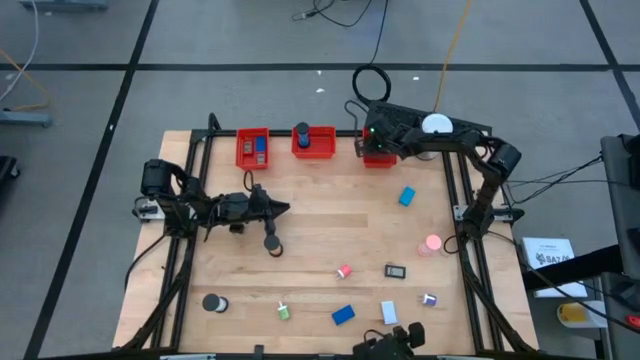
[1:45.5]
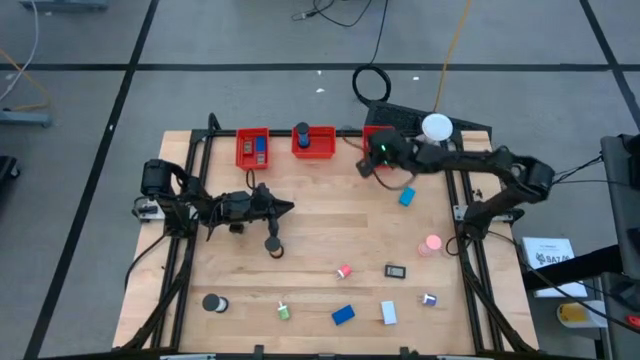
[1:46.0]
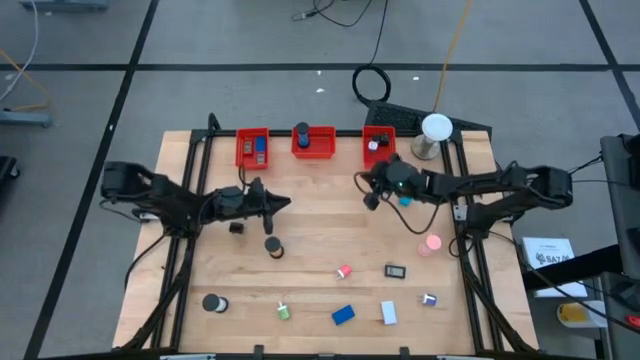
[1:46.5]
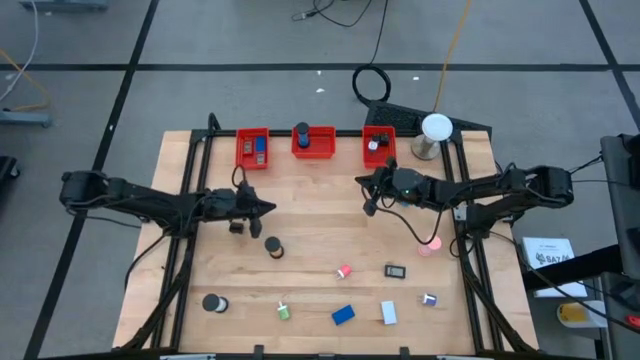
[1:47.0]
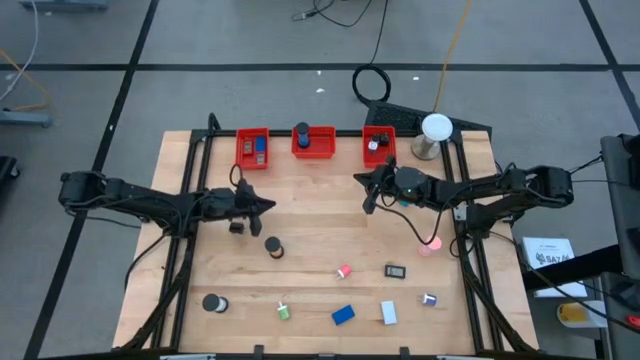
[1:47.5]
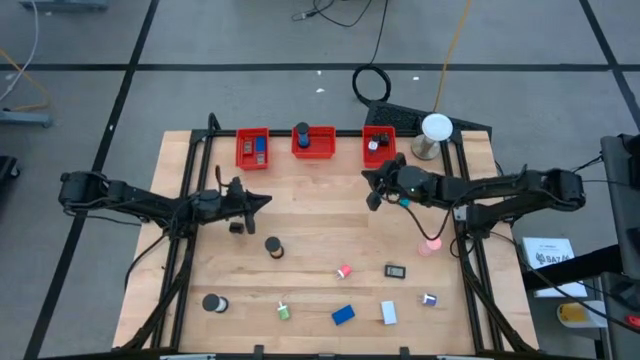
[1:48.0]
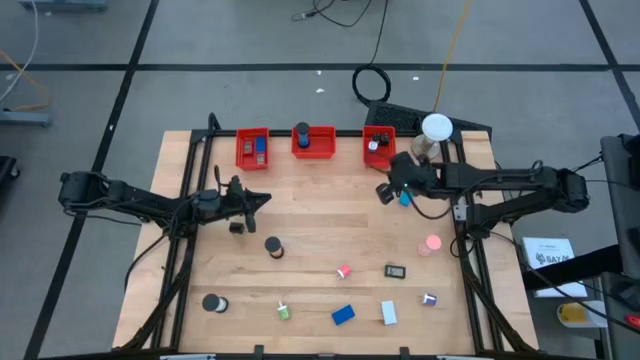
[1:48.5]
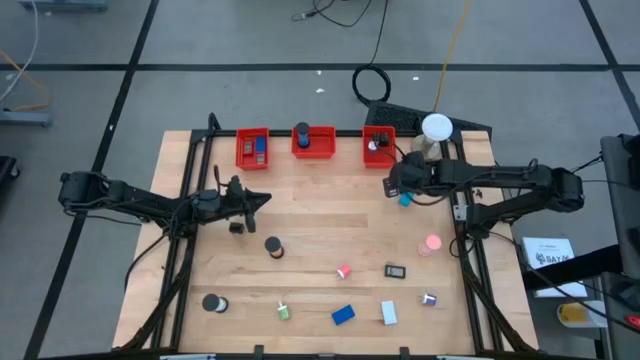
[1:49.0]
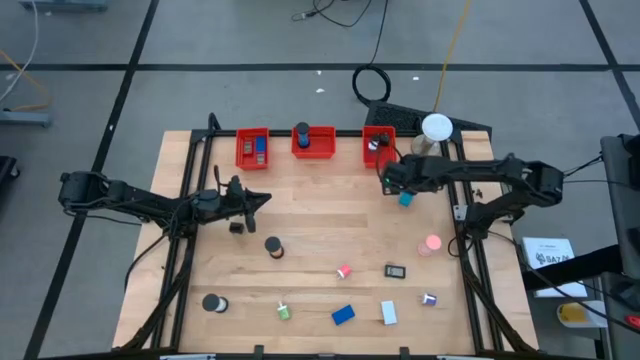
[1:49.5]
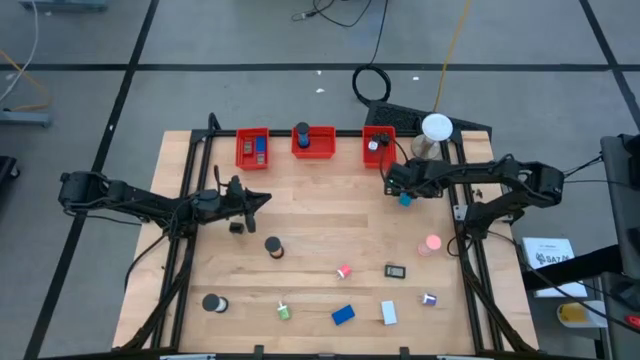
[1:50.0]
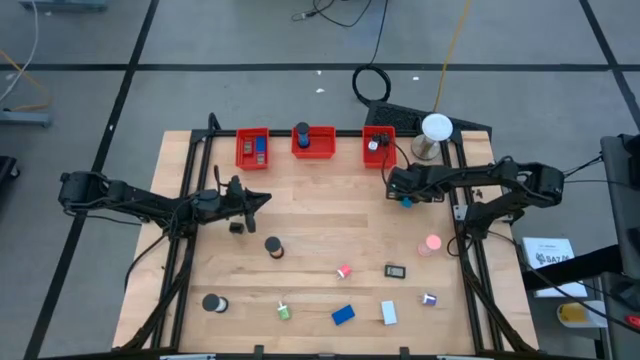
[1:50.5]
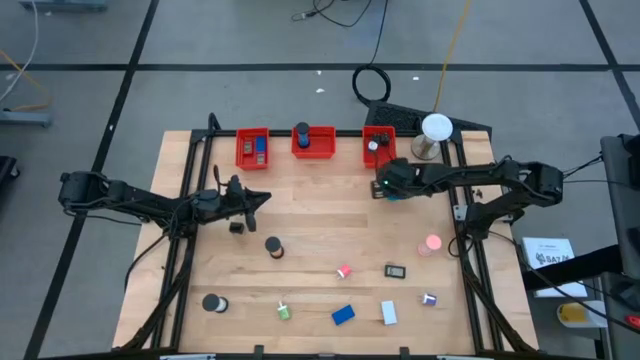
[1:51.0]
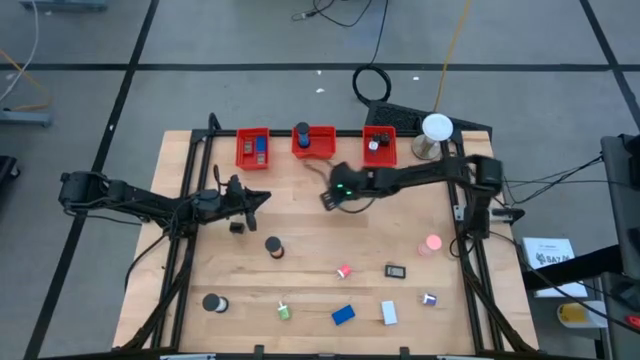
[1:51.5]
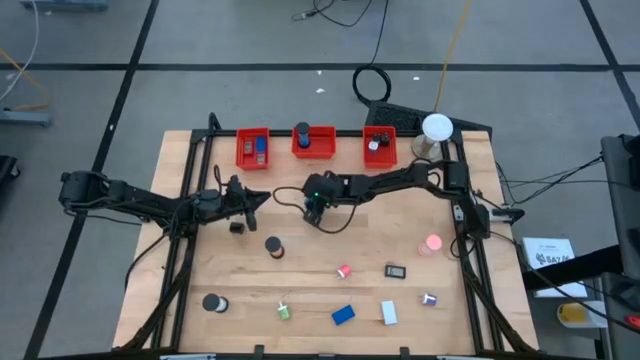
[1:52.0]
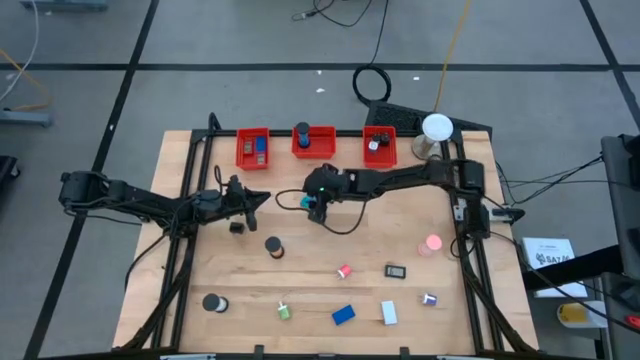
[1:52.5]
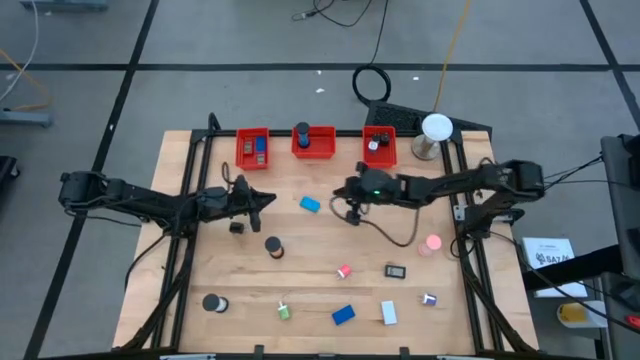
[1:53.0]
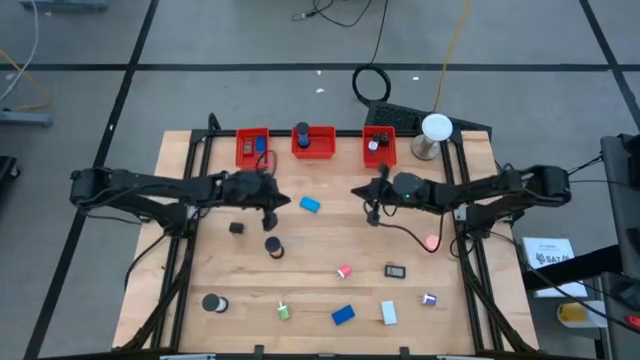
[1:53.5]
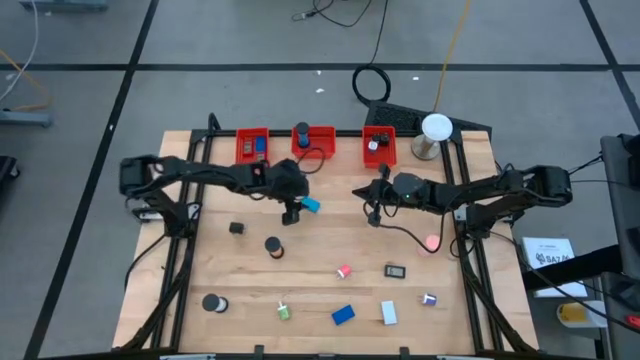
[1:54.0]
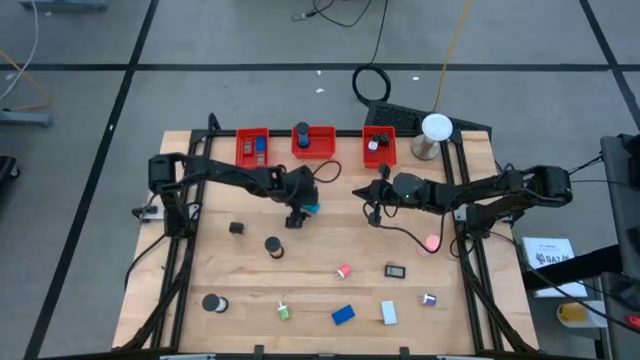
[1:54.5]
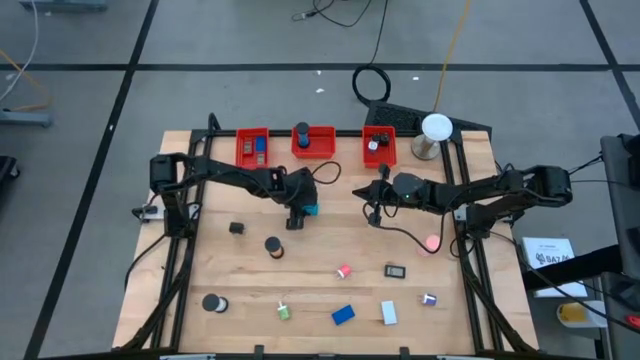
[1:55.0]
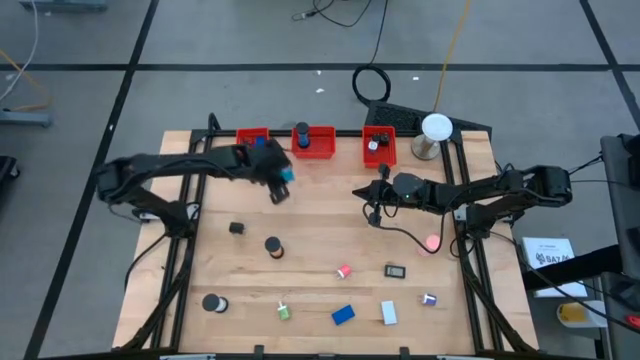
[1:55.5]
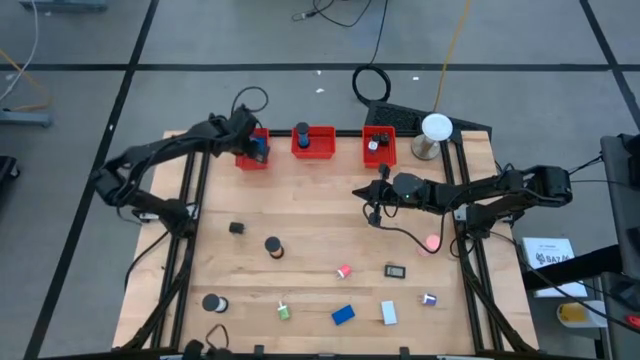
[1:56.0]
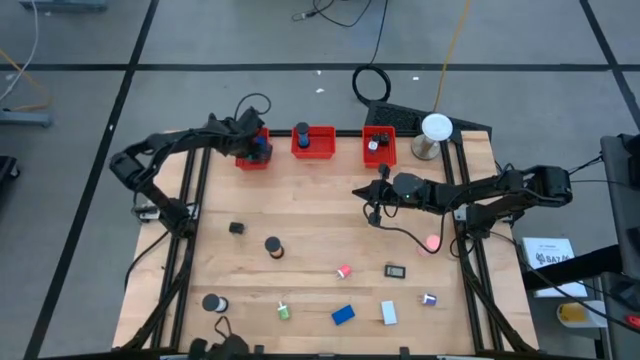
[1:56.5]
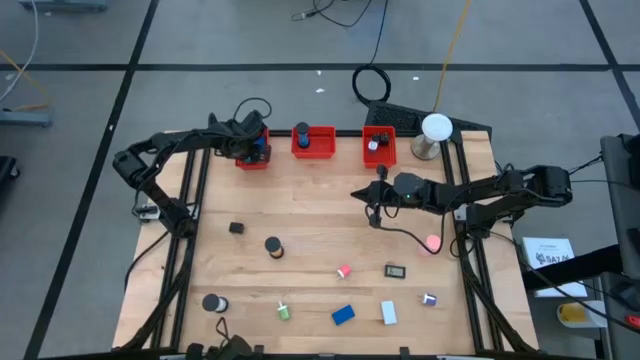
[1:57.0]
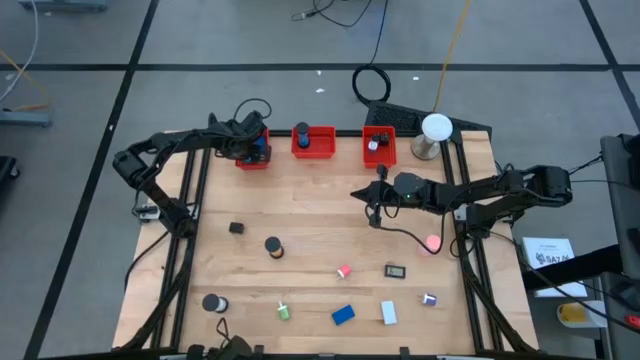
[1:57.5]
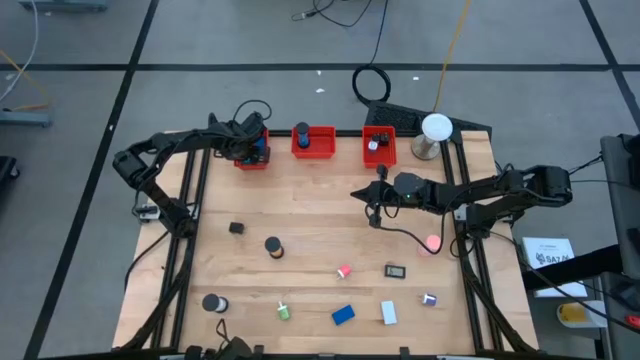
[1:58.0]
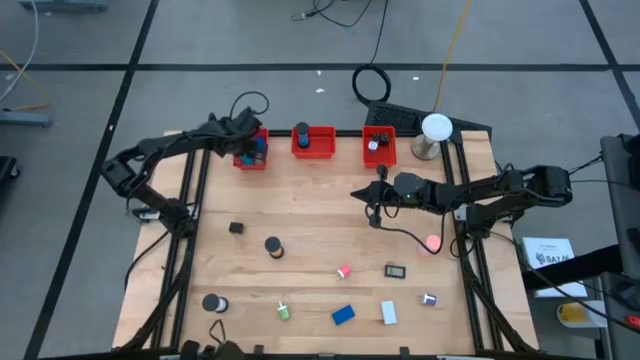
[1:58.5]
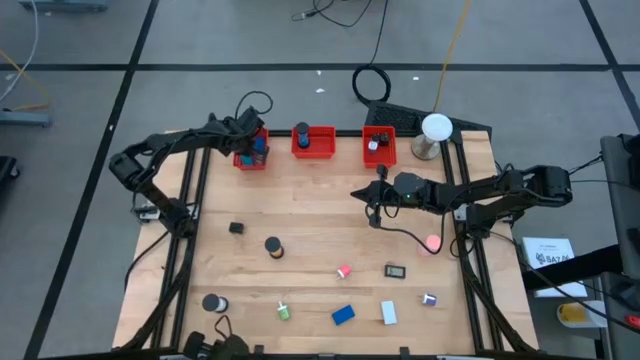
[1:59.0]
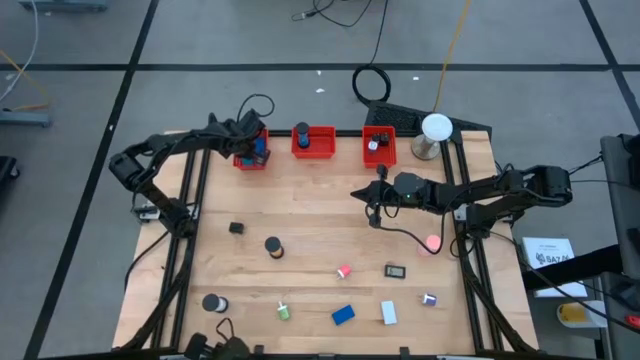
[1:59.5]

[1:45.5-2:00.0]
Task: Pick & Place Office items
Put the top blue timer into the left orange basket

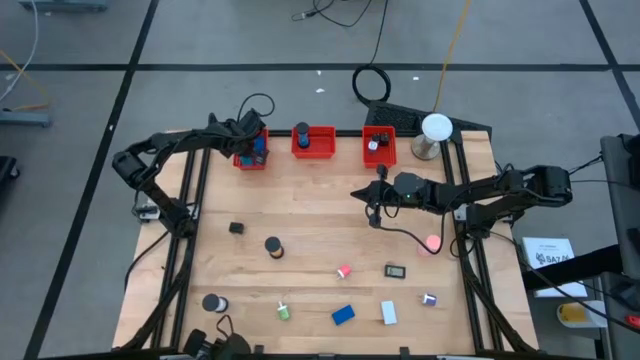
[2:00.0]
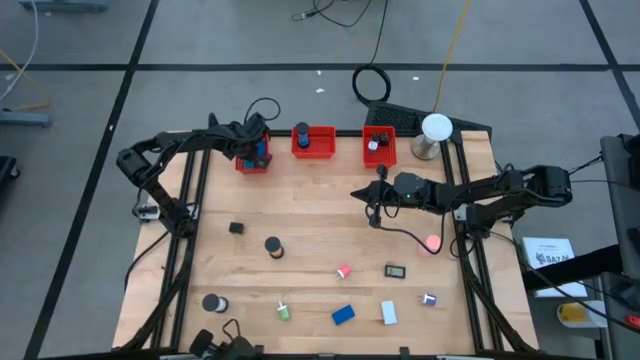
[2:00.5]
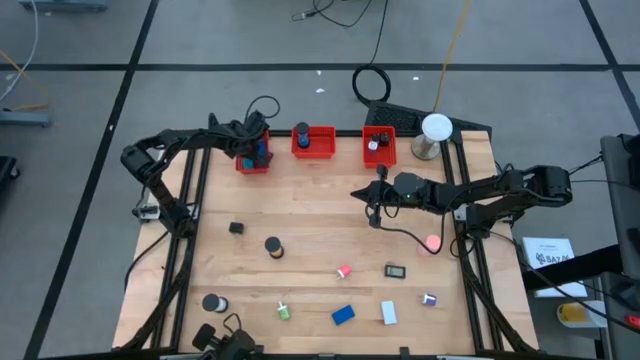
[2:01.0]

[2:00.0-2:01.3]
Adjust the red timer

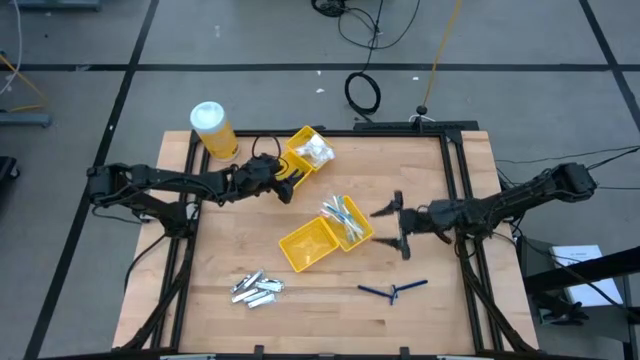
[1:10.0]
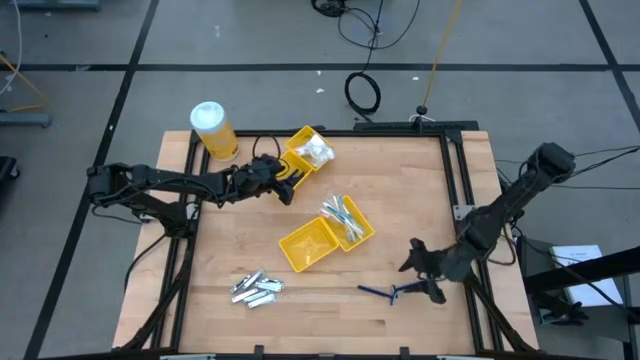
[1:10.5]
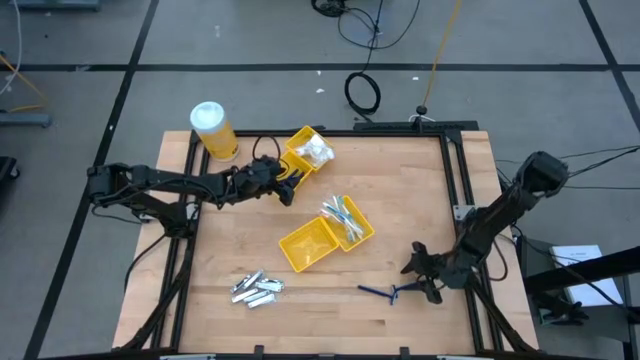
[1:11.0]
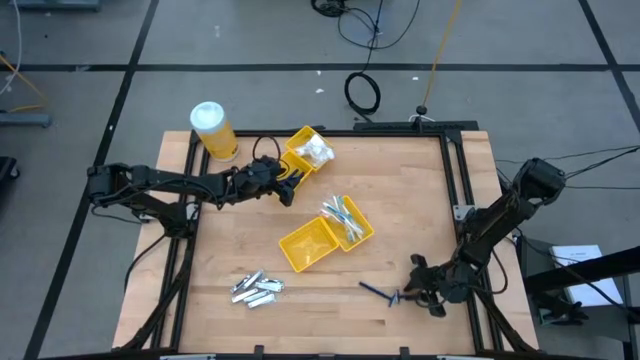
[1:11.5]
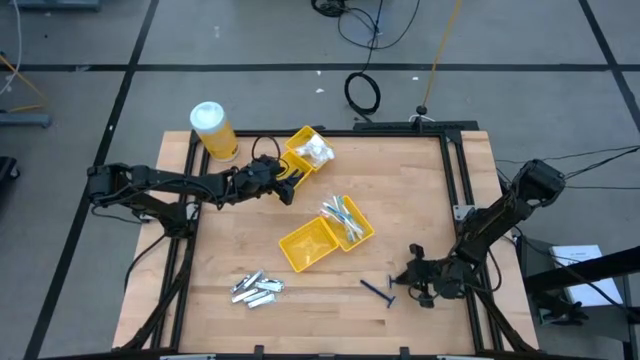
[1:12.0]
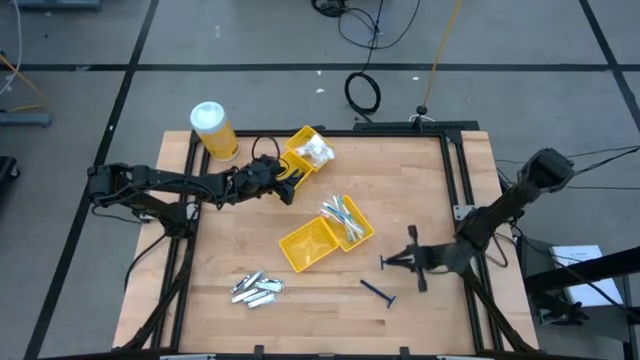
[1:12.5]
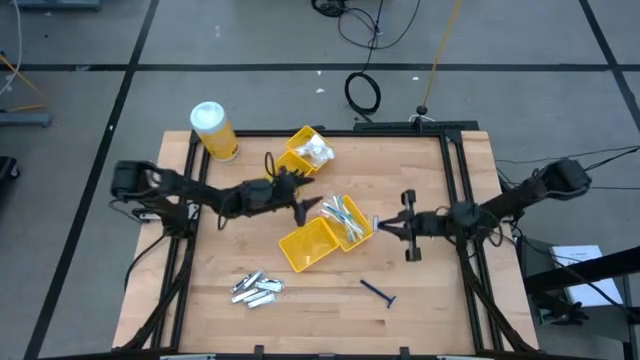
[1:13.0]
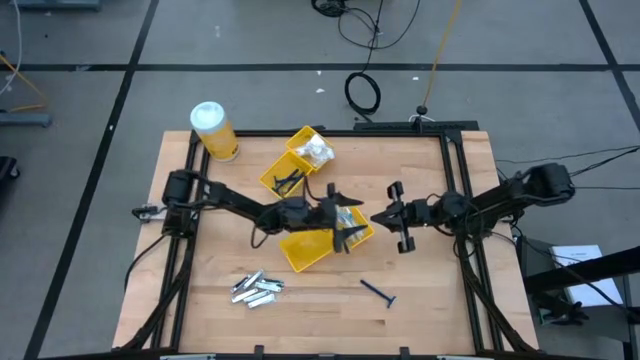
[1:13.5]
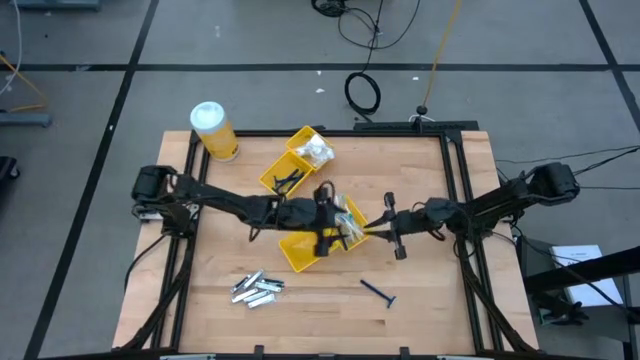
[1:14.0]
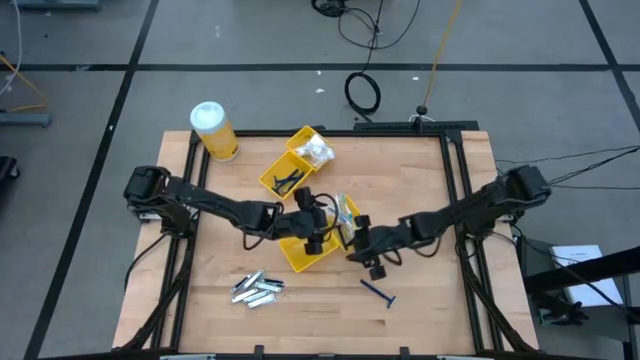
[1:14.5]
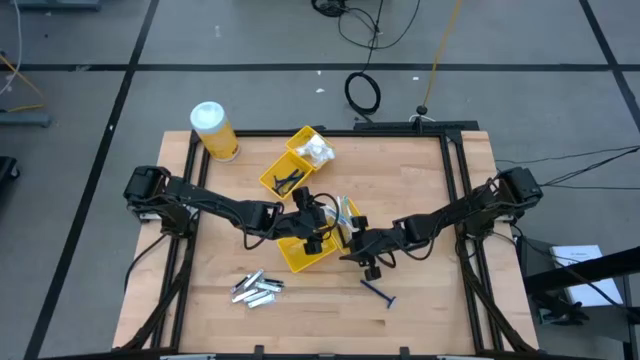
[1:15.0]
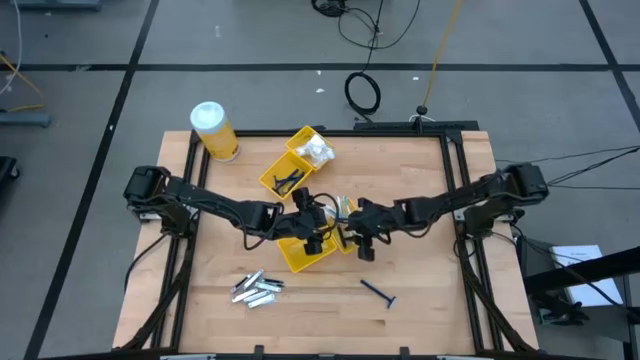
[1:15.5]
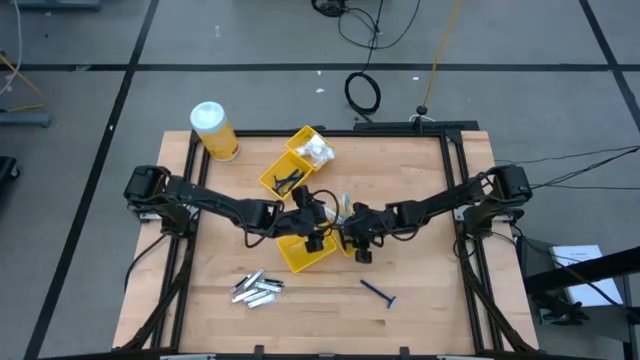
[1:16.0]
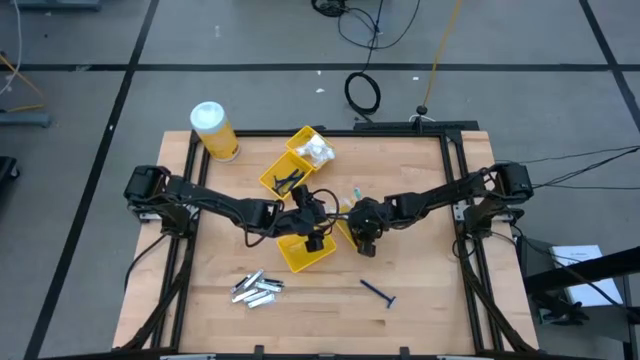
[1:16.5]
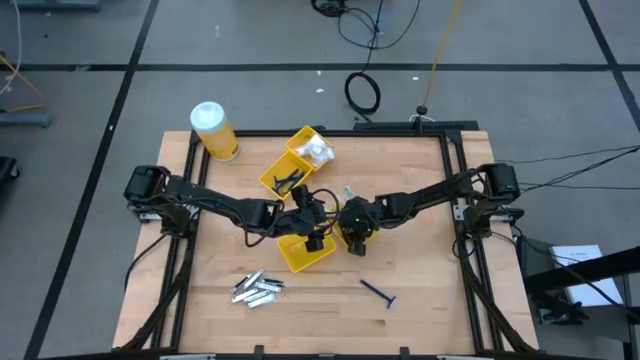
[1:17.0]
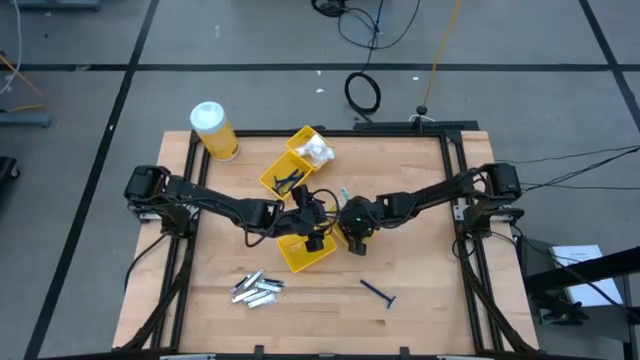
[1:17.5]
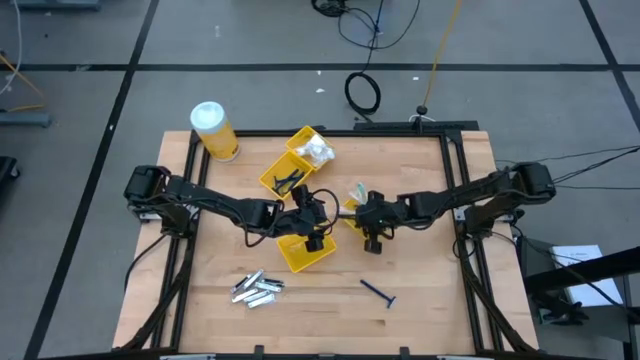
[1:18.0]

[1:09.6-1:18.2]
Task: Pick & Place Travel size toiletries
Put the blue razor into the bottom left yellow basket
